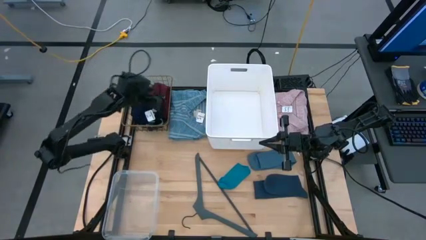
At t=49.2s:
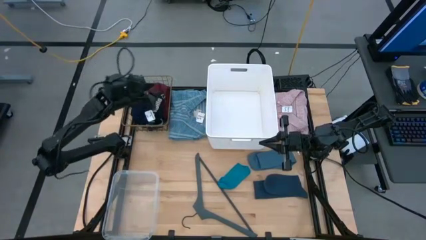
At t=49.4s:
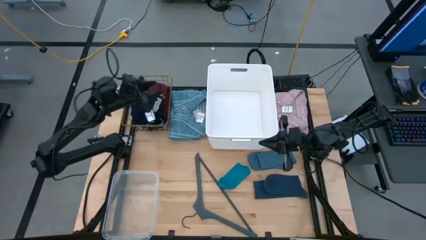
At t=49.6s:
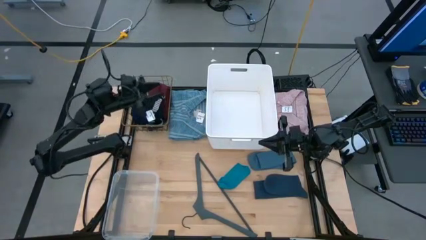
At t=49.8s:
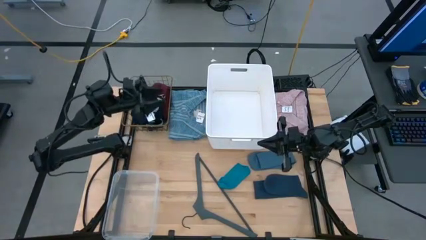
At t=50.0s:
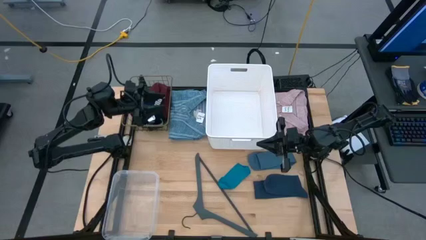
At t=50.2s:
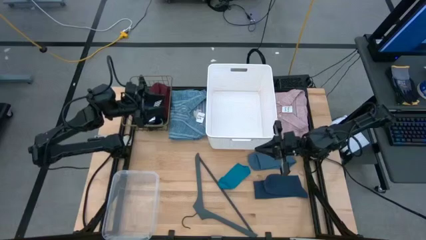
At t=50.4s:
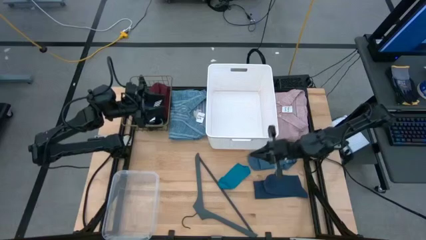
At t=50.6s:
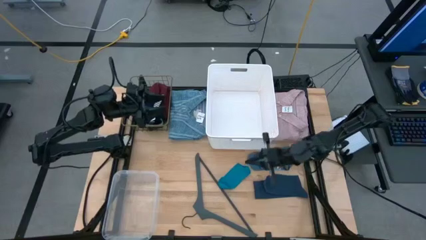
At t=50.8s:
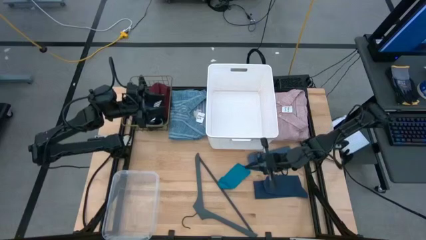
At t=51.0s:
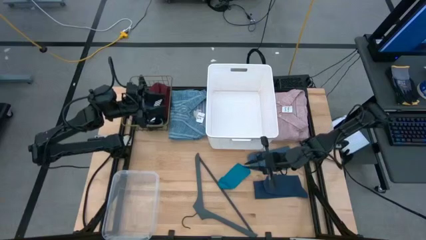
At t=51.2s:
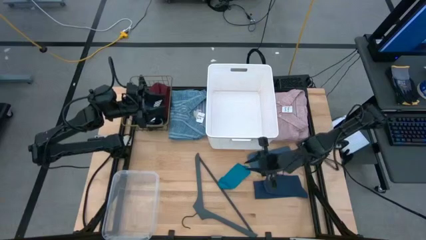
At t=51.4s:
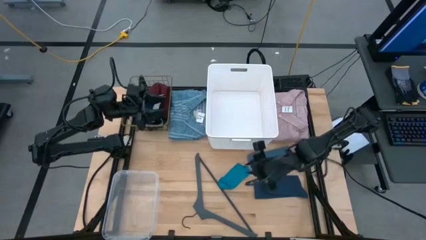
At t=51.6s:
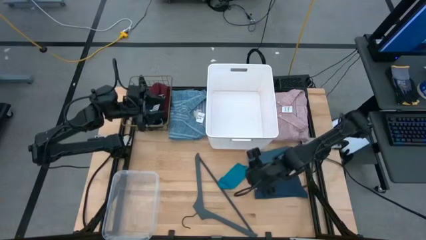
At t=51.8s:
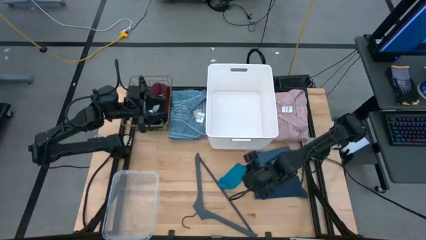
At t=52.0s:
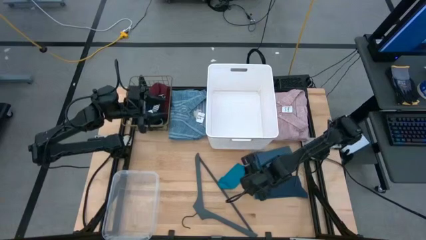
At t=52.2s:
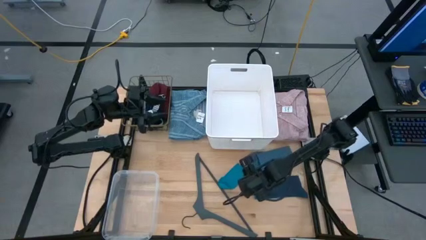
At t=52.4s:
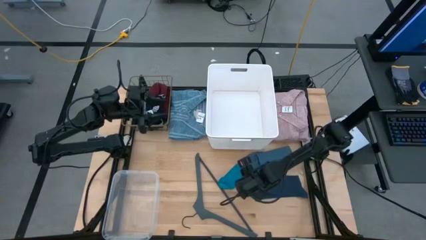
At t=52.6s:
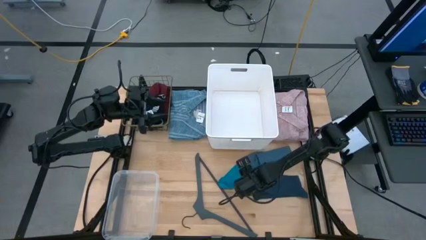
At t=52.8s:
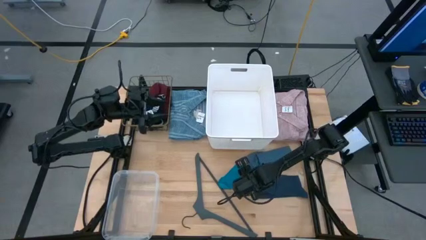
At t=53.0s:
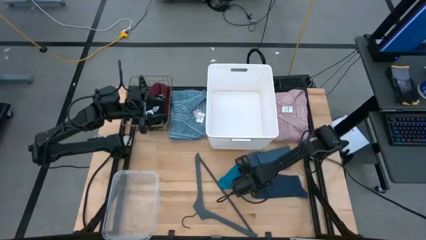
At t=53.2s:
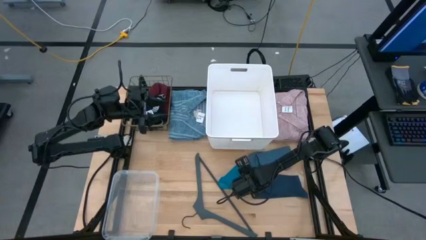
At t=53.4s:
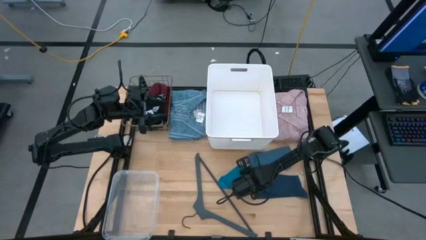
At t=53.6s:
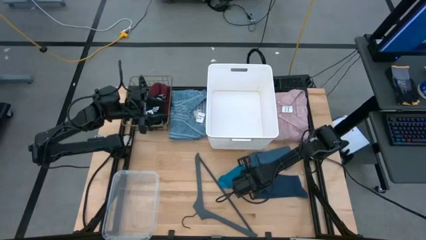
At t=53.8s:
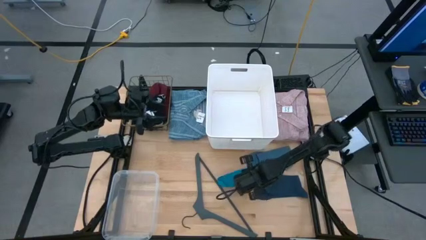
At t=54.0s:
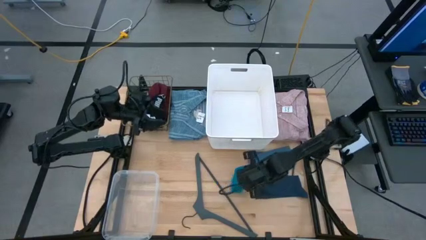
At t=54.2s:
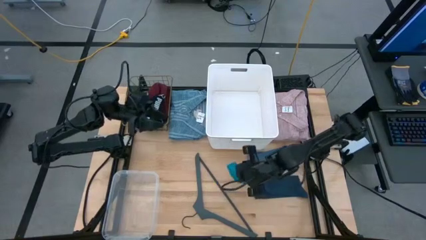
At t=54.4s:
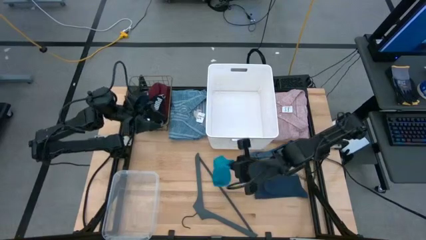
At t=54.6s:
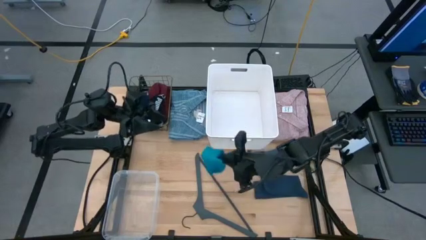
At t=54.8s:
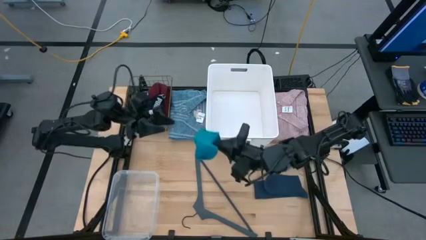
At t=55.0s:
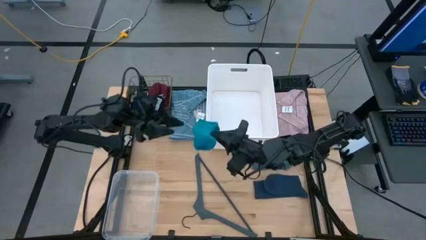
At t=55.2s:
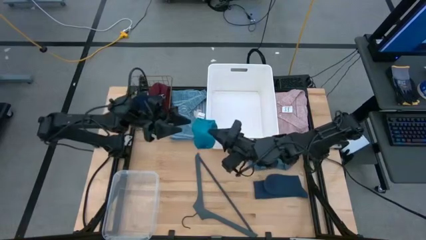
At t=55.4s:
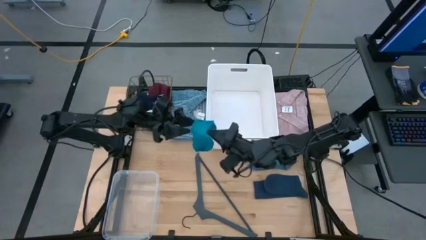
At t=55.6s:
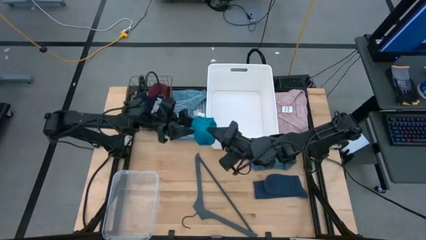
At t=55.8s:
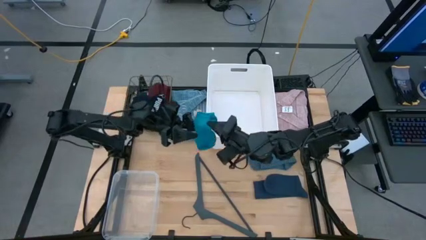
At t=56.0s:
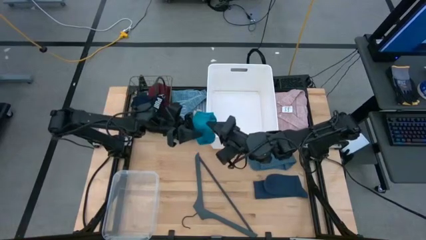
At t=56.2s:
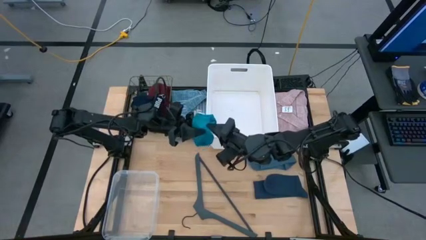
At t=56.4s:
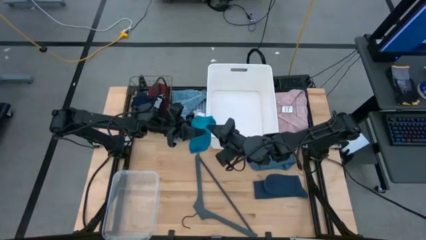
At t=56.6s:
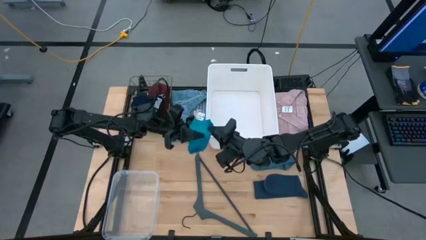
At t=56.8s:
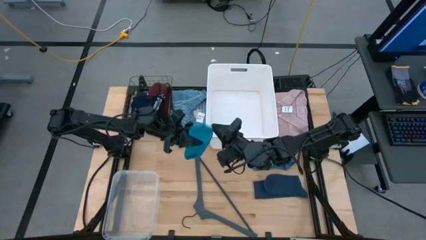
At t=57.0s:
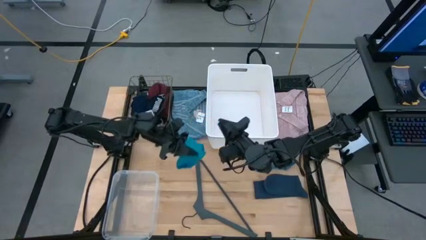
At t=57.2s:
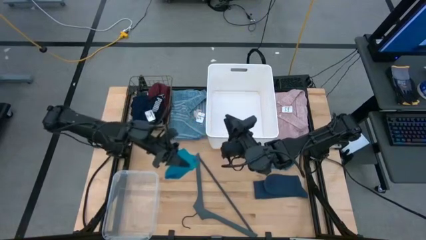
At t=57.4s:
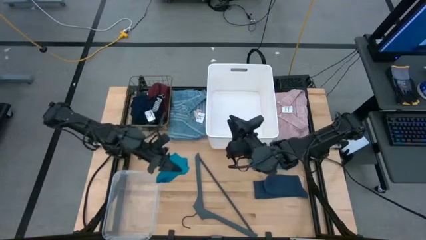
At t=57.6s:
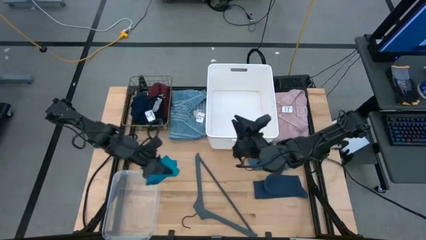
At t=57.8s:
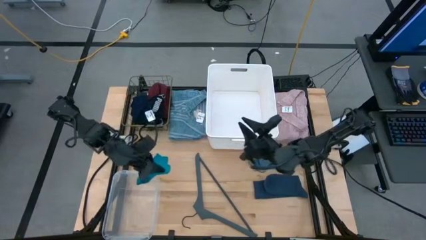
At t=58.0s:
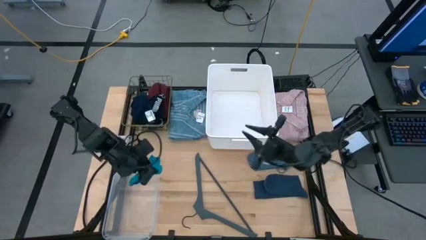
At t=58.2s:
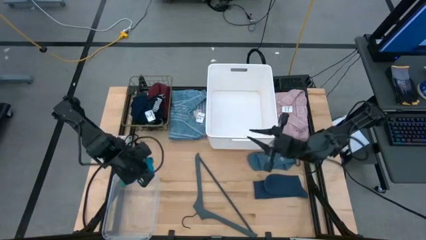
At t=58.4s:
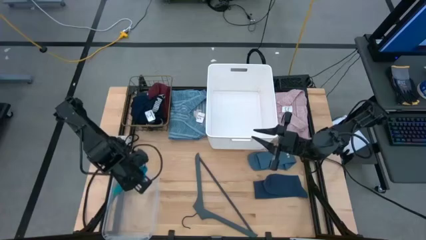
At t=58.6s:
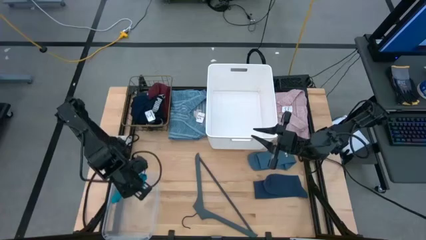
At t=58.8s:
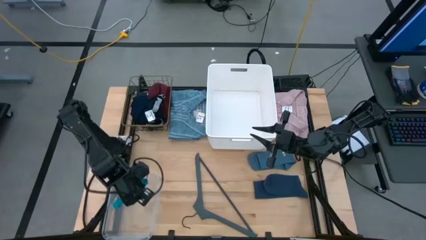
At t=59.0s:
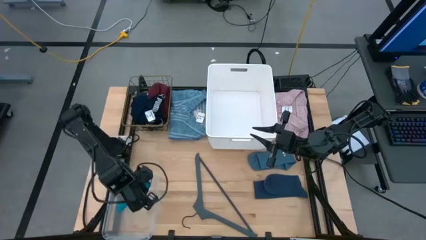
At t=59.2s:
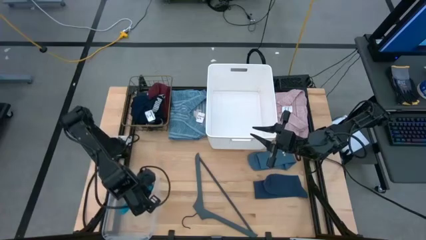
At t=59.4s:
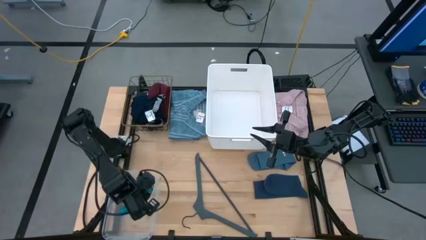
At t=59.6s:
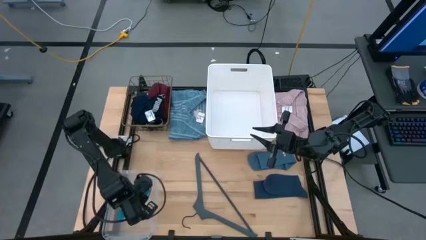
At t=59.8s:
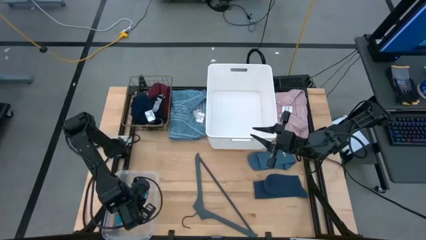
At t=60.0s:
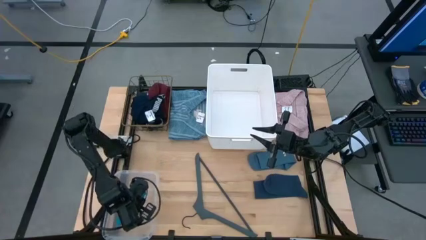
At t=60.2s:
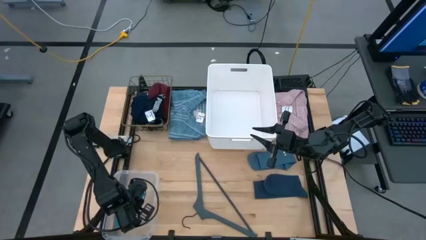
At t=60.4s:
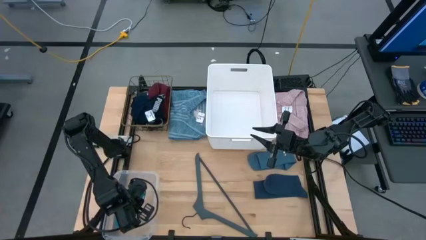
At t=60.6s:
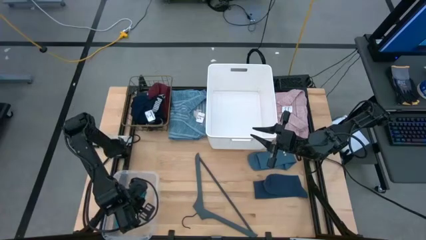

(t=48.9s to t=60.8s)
Task: Pick & Place Cloths
Put the light blue sock into the transparent bin

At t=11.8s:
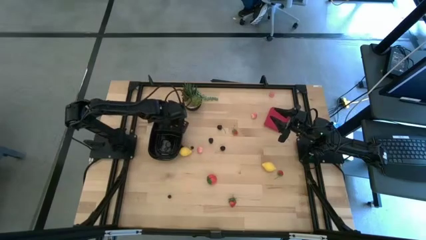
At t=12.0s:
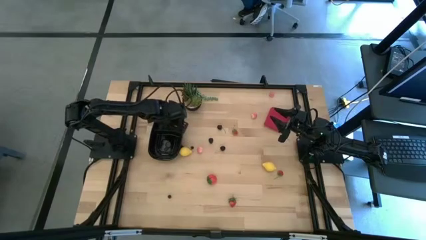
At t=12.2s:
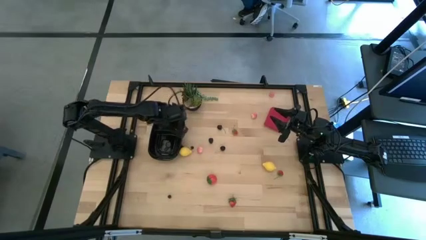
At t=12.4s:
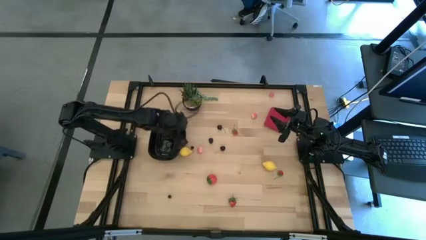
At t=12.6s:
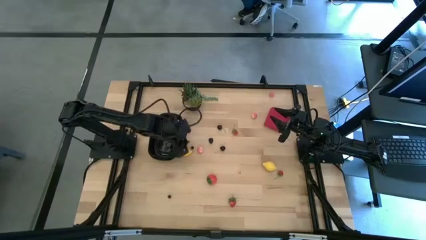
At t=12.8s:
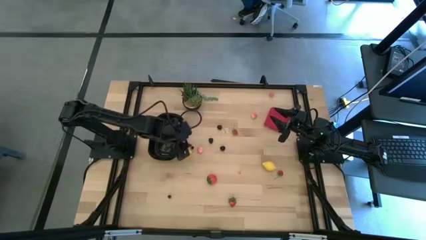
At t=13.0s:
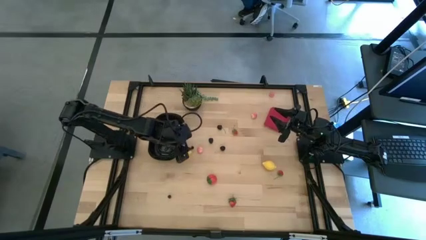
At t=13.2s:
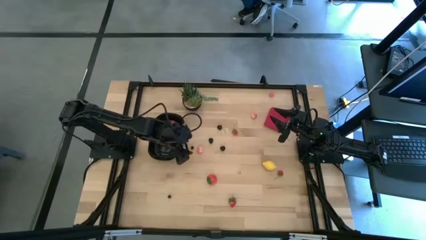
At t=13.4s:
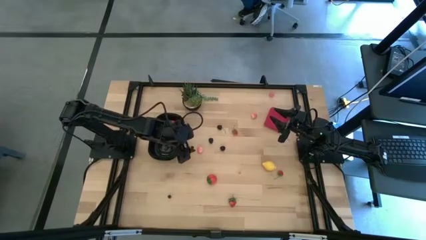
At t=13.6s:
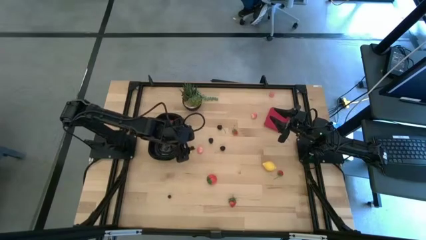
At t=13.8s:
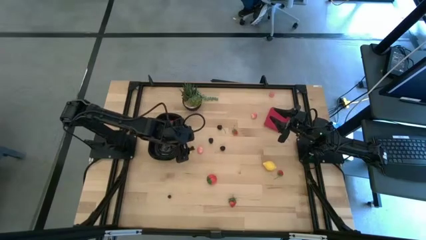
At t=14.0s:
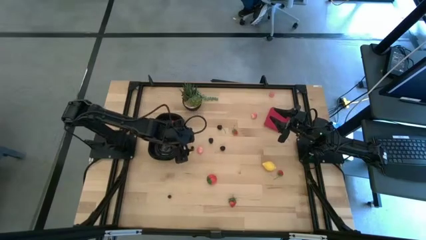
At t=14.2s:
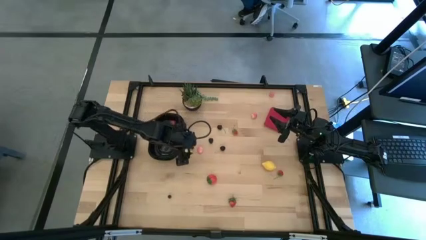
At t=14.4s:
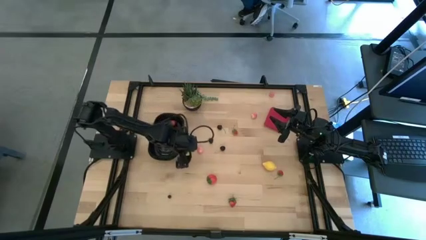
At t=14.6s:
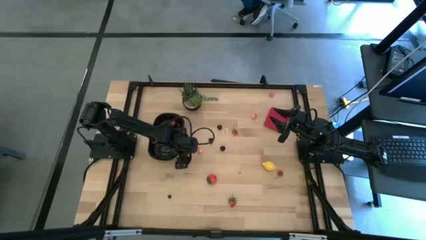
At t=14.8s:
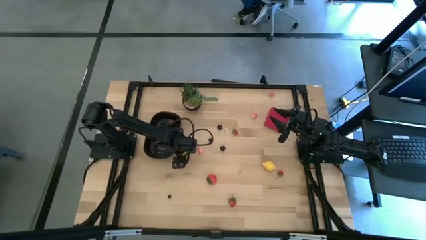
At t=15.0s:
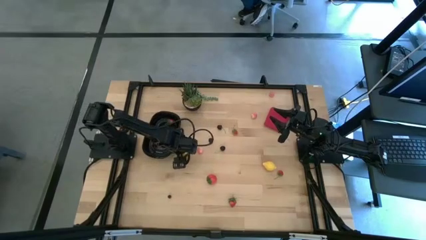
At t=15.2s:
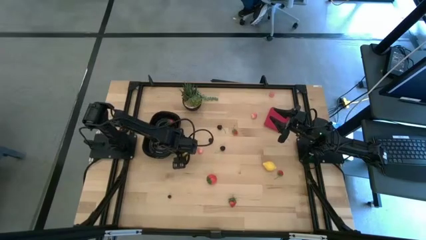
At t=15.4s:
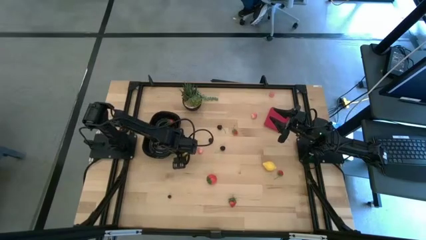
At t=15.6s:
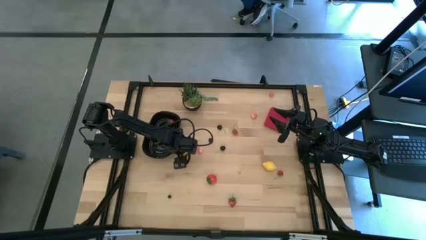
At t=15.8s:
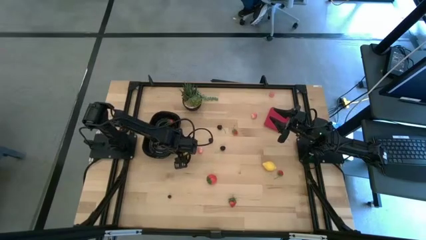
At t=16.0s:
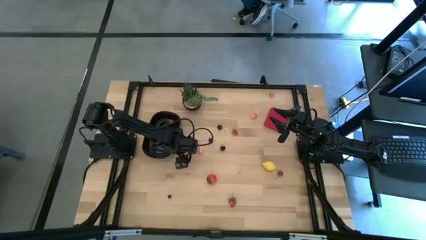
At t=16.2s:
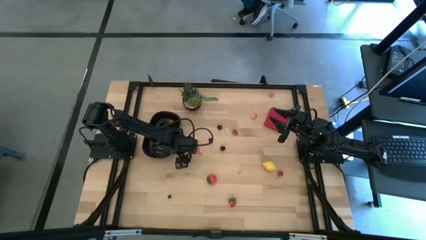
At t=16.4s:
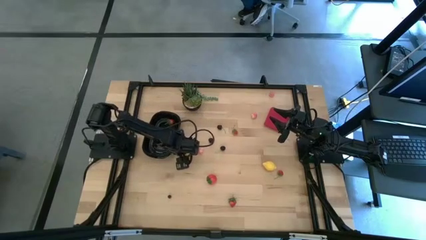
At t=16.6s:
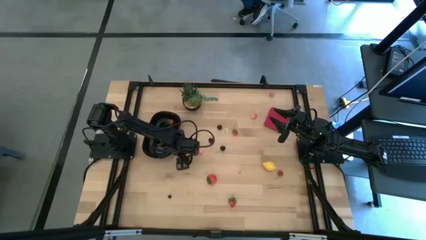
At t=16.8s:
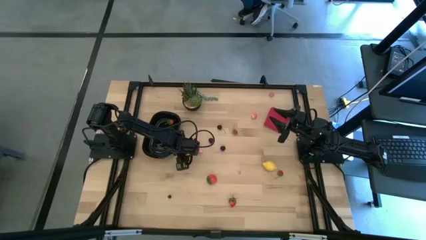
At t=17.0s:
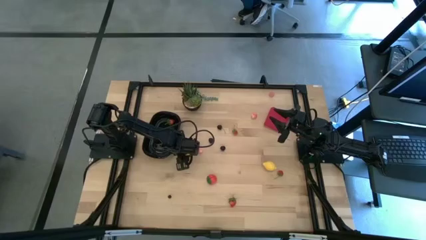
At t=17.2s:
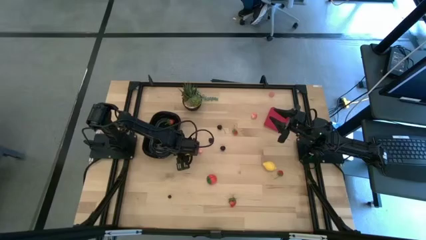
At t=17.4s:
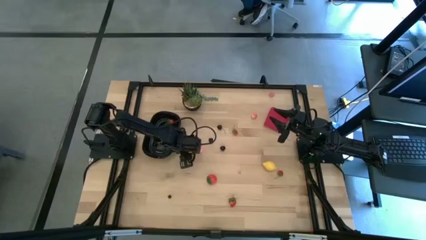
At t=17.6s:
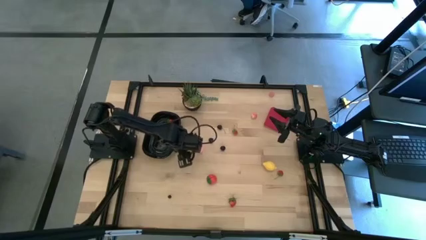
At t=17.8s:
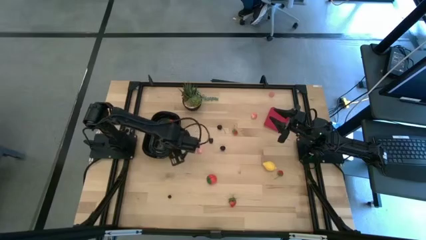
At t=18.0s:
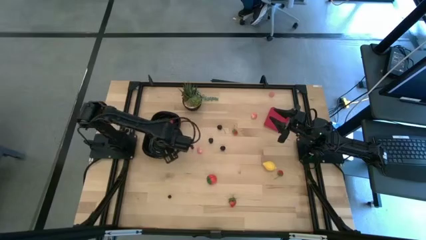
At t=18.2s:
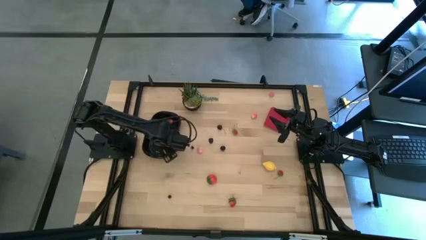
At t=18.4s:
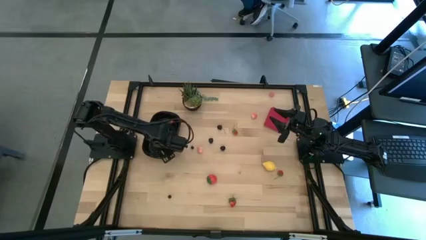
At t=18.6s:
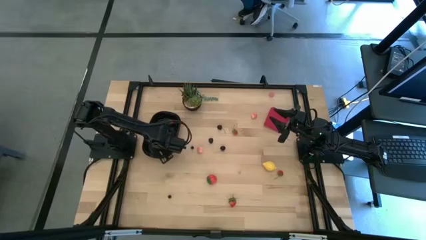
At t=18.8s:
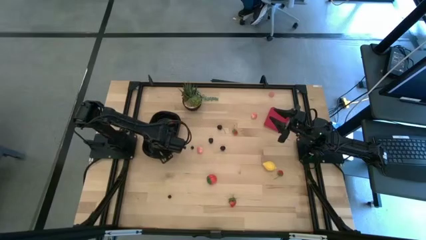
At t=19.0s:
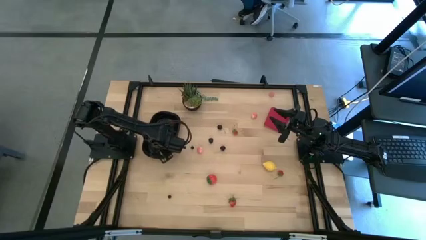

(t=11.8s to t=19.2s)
Task: Pick and placing Produce into tupperware
Put the yellow lemon into the black container
